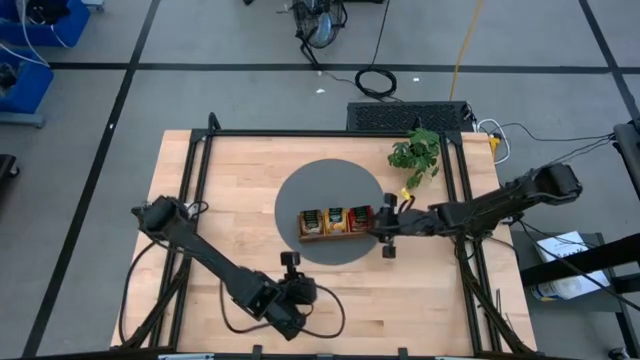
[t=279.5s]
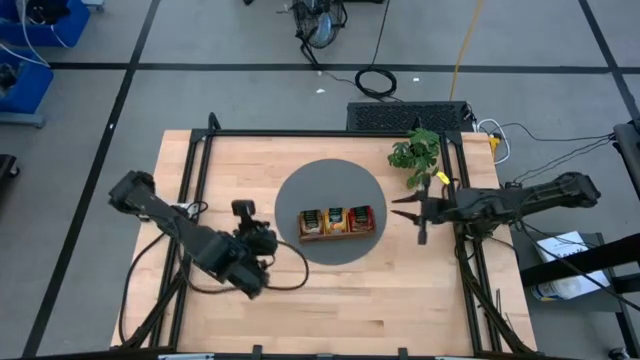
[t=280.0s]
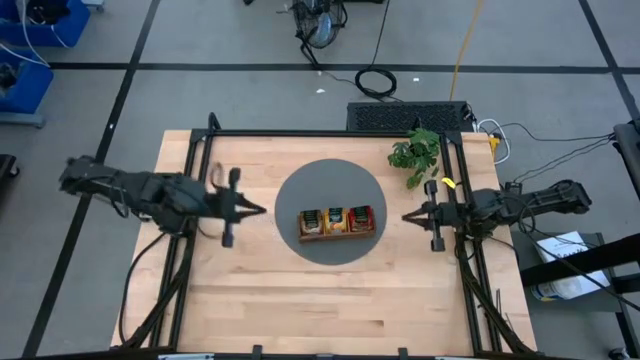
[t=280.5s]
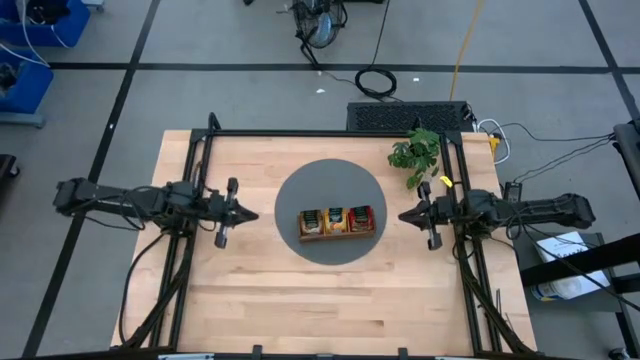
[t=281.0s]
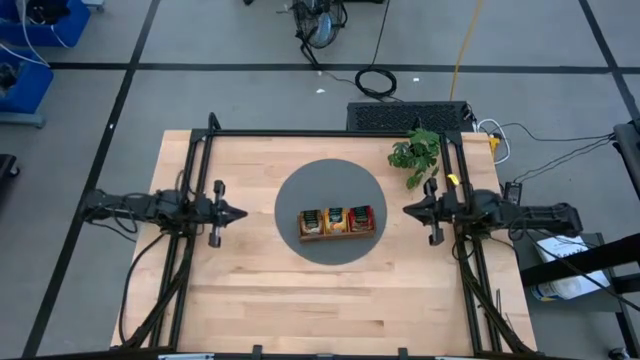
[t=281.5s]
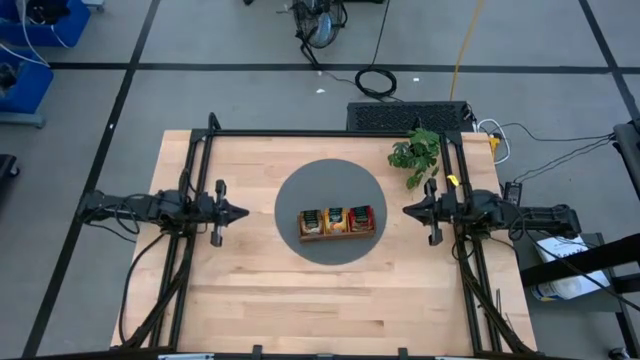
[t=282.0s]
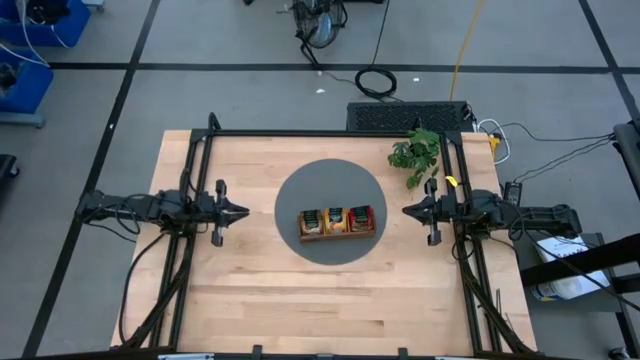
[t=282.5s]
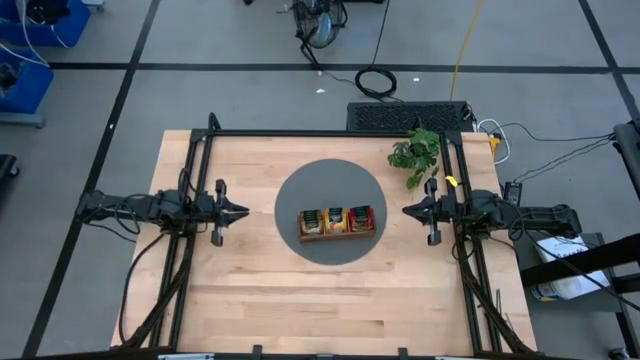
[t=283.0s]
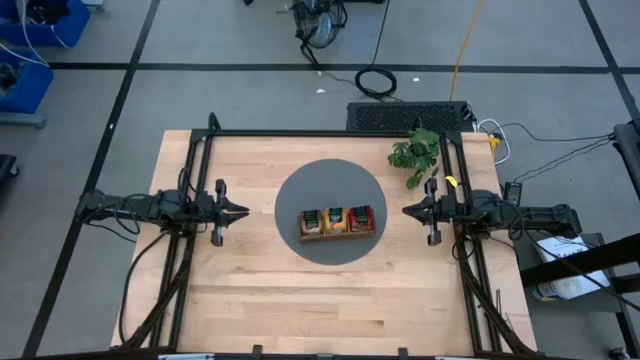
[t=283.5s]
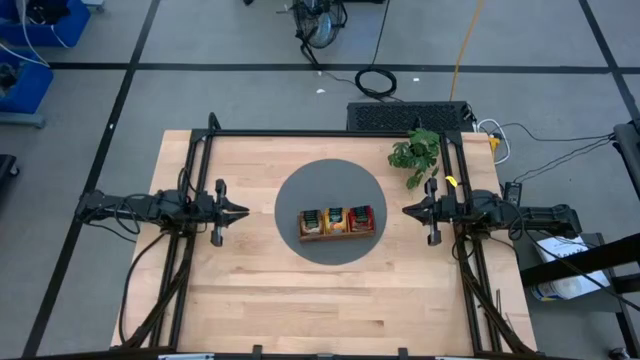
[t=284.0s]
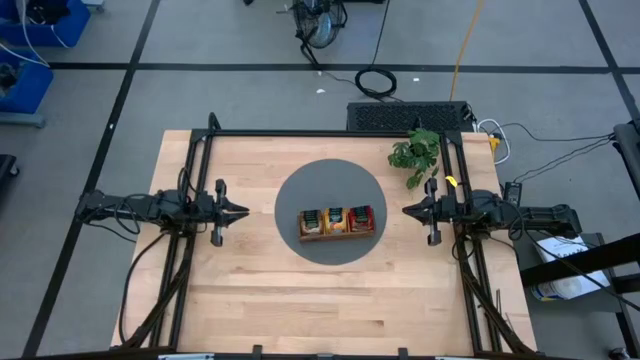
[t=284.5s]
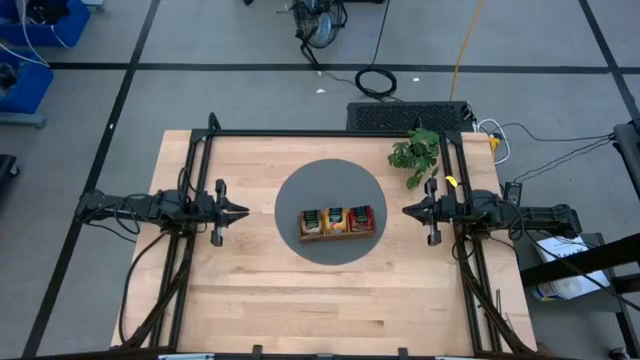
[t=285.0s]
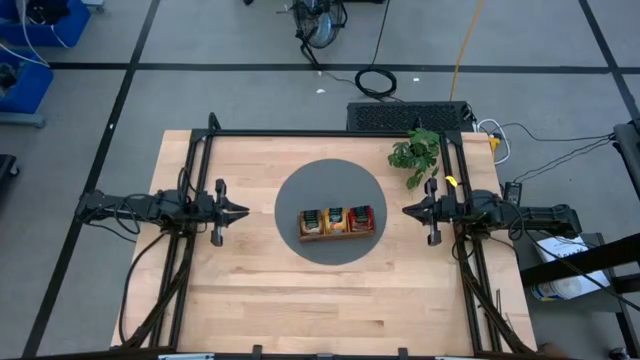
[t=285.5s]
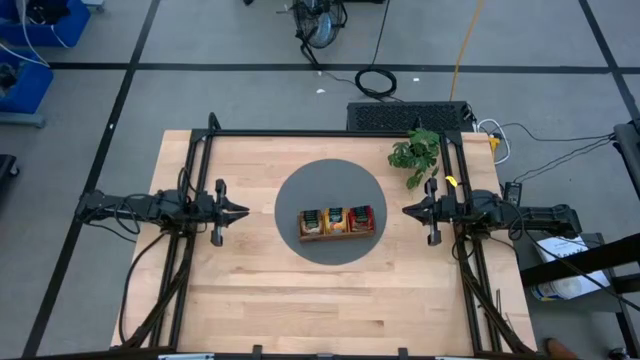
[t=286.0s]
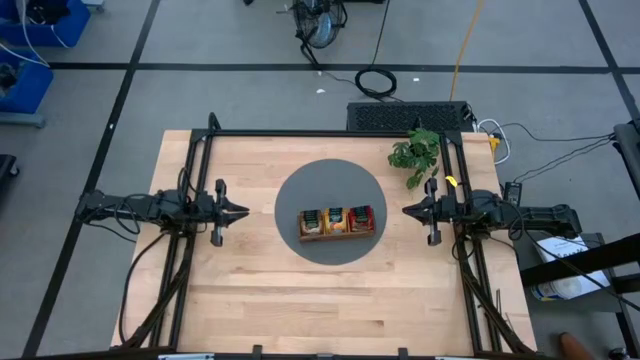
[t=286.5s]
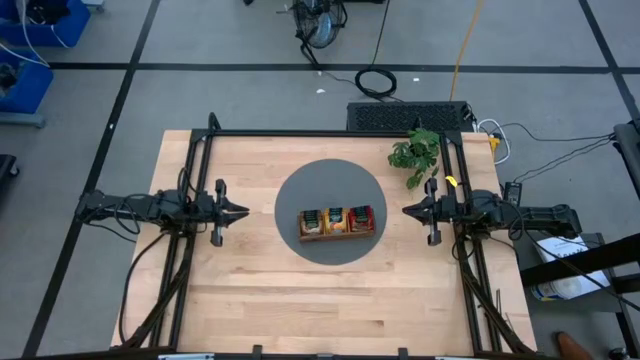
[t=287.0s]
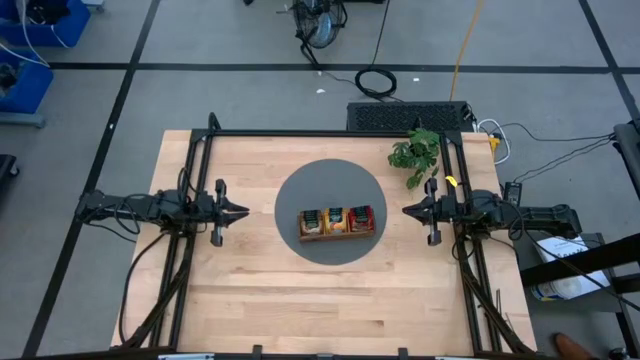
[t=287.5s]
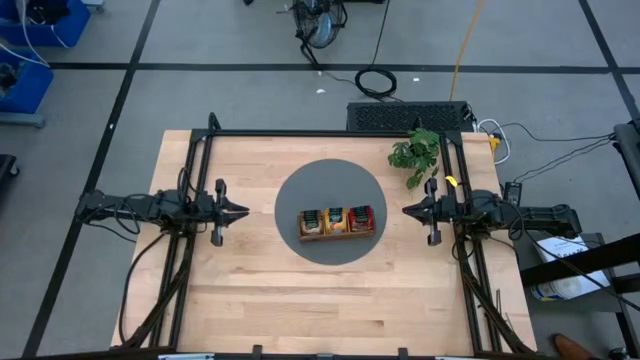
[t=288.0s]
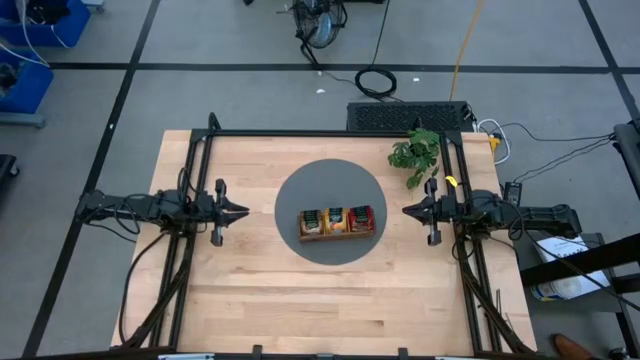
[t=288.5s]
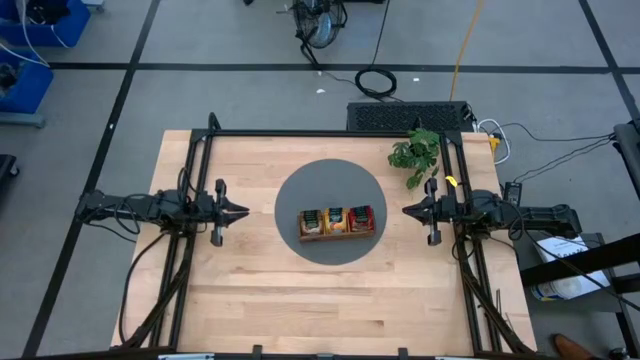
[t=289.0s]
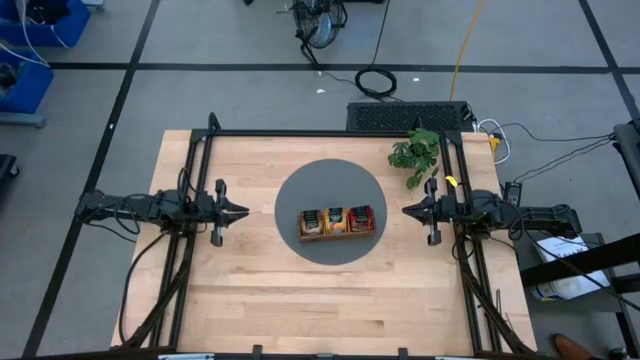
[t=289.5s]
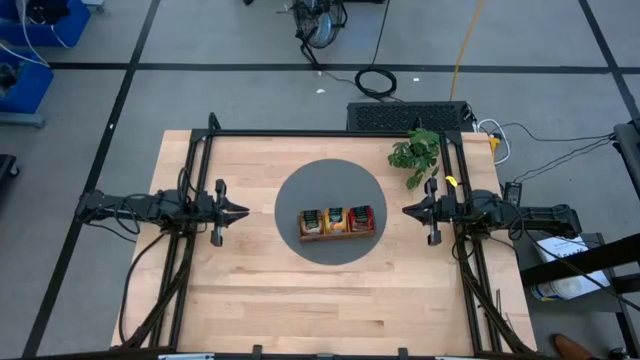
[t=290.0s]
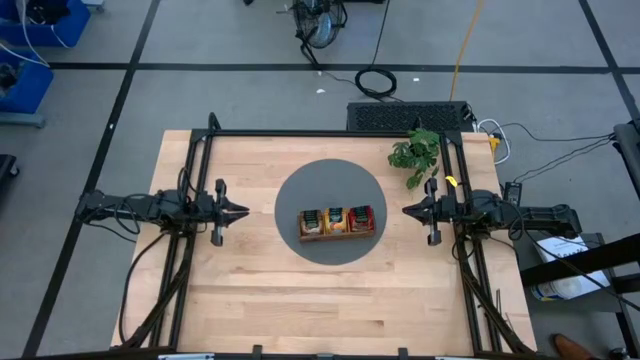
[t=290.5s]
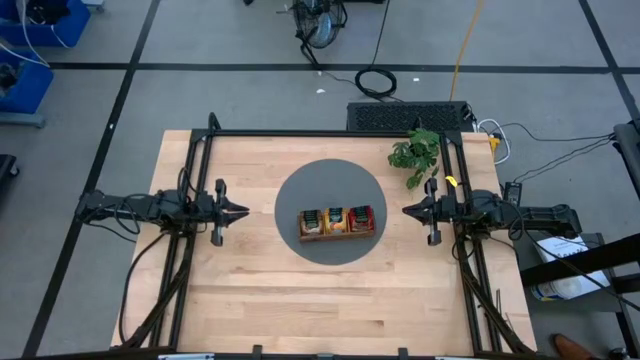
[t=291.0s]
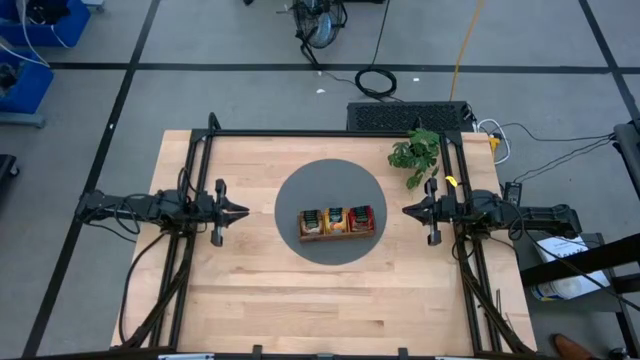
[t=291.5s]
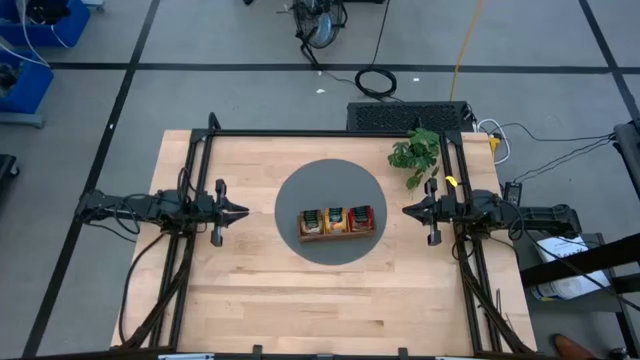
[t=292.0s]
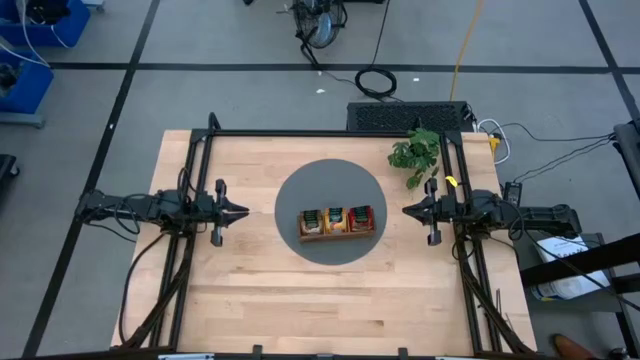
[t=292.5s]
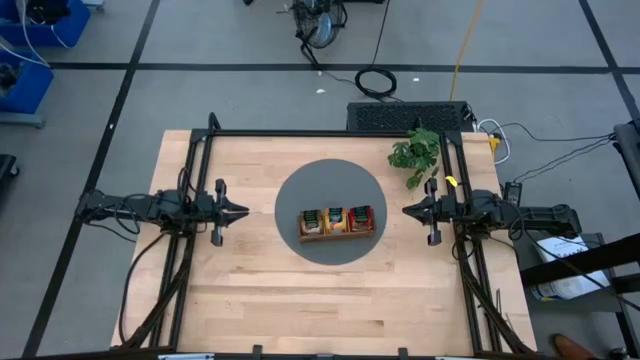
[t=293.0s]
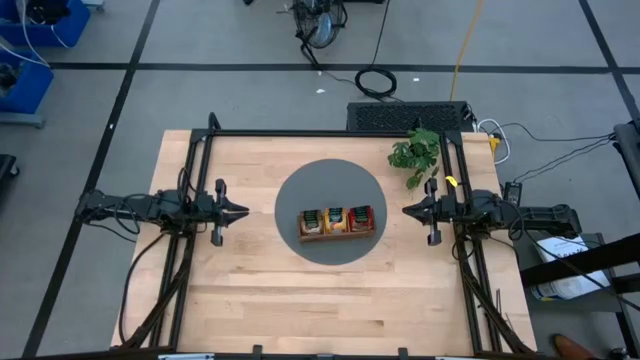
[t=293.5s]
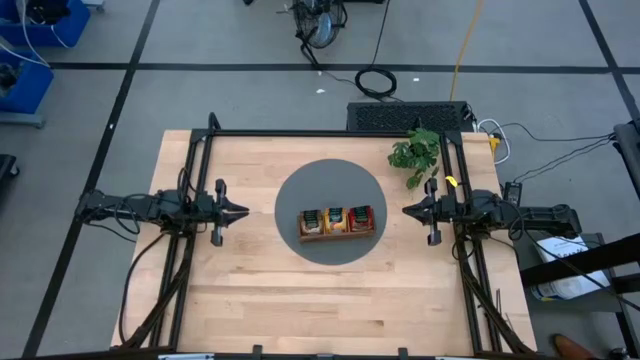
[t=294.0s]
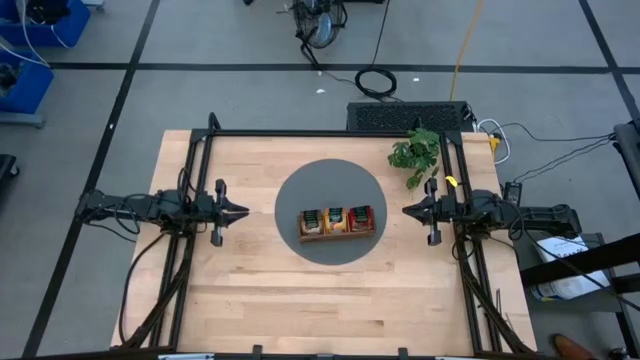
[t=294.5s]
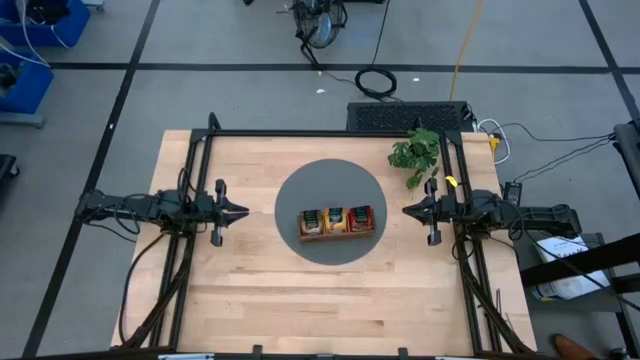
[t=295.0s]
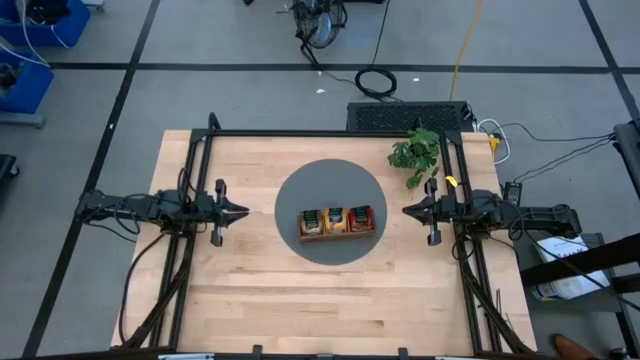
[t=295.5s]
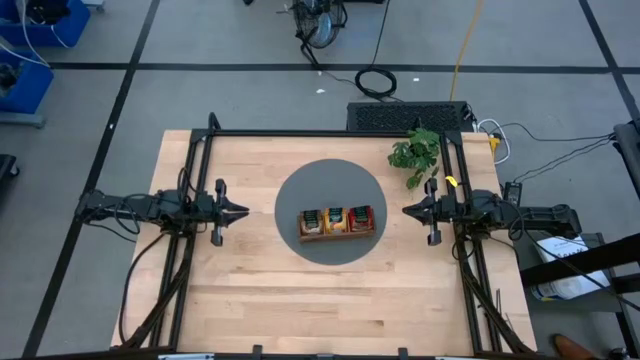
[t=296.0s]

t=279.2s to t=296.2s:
Task: Pick & Place Tea
Return to Home Position

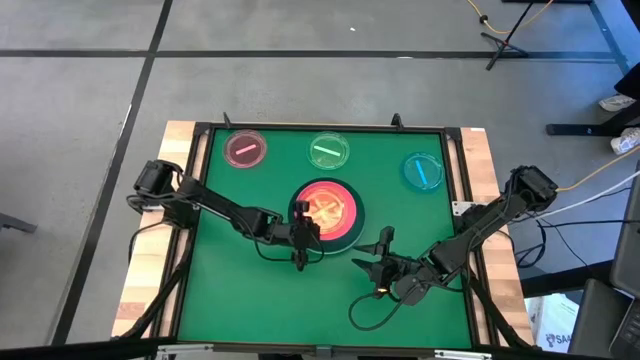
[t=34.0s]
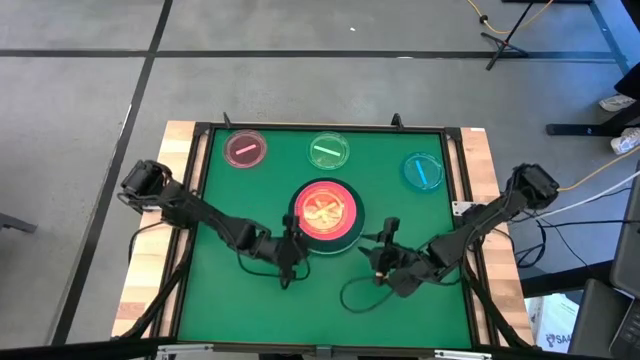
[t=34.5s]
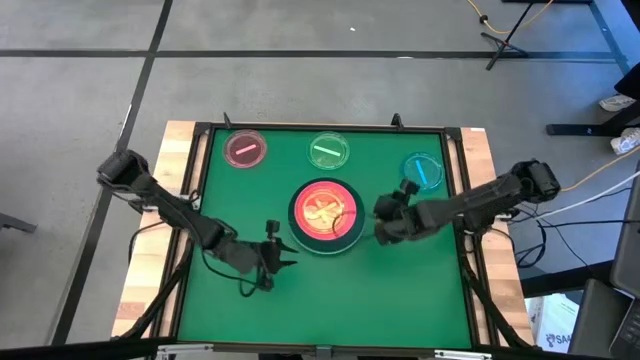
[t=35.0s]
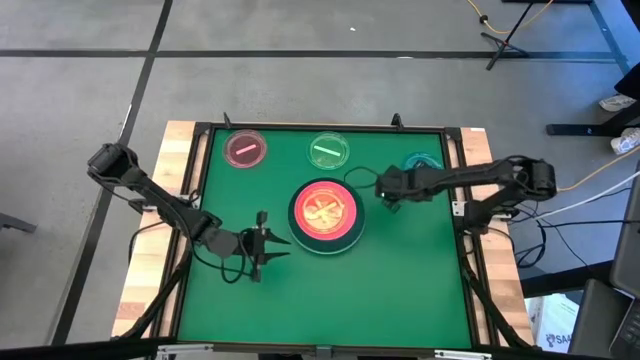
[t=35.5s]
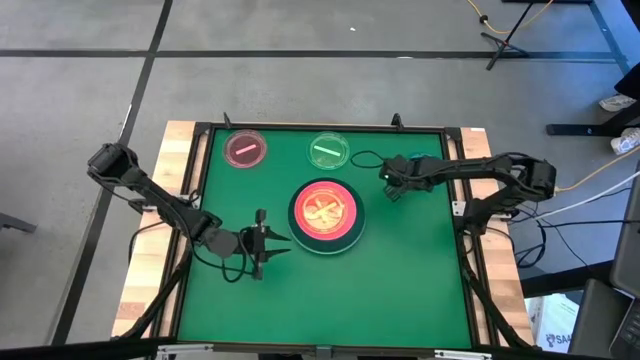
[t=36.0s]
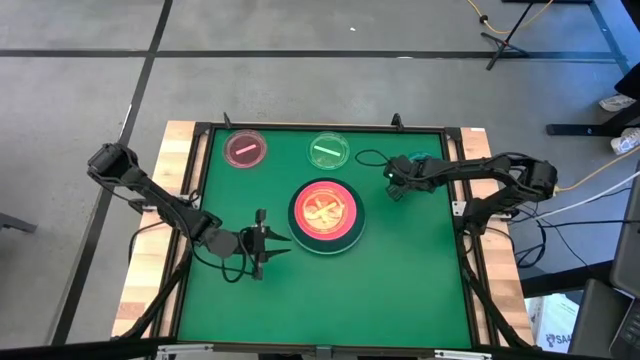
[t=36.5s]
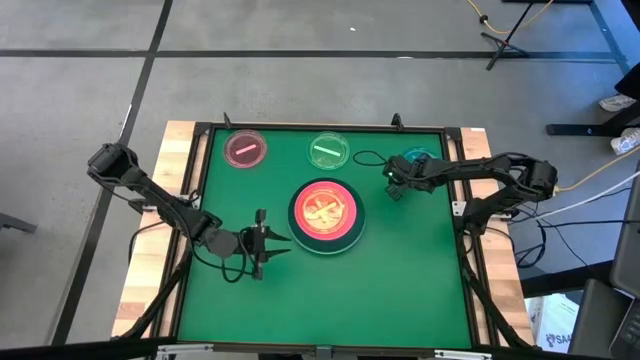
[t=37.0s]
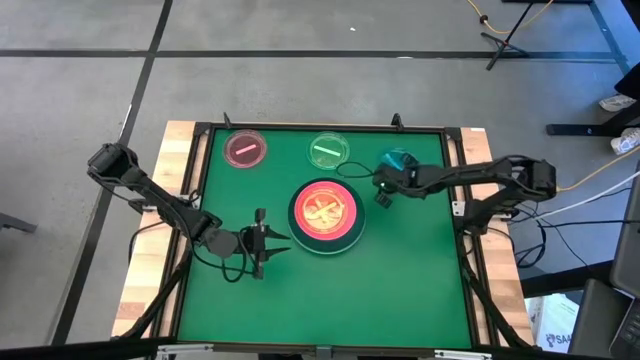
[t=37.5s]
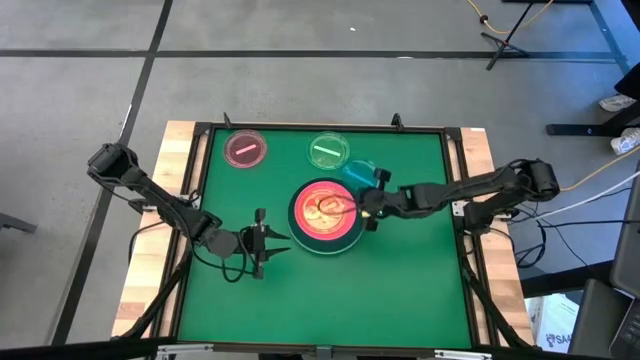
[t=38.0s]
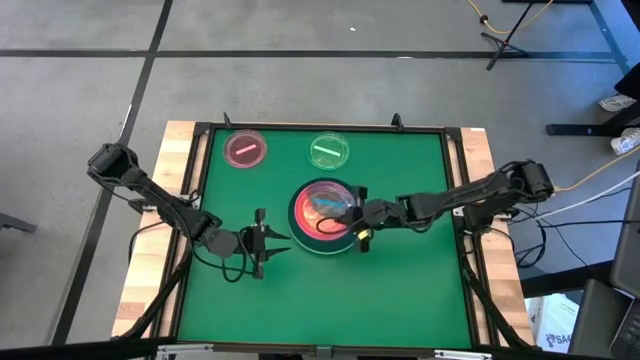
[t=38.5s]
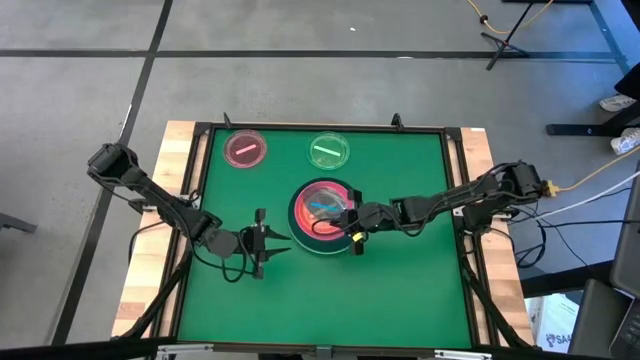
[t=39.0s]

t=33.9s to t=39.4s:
Task: Stack plastic plates
Stack the blue transparent plate on the orange transparent plate
